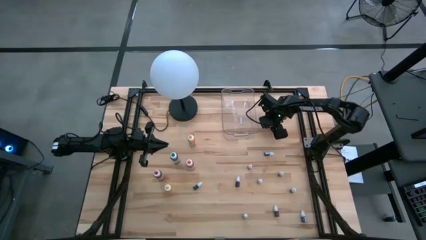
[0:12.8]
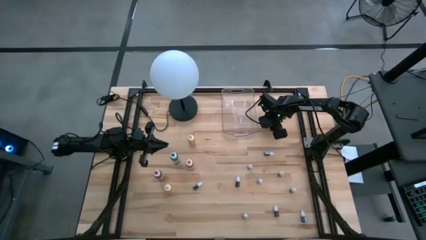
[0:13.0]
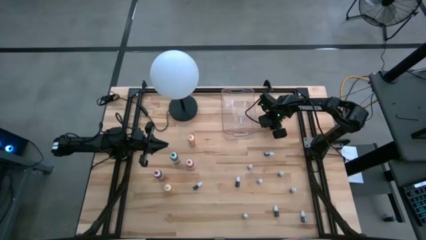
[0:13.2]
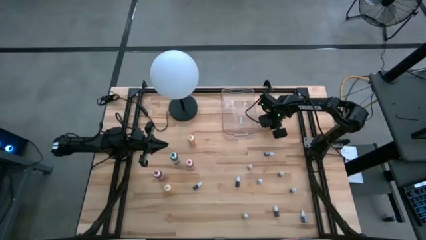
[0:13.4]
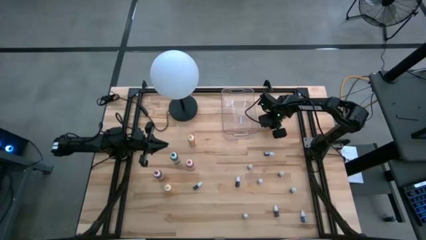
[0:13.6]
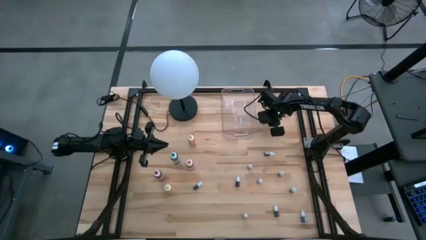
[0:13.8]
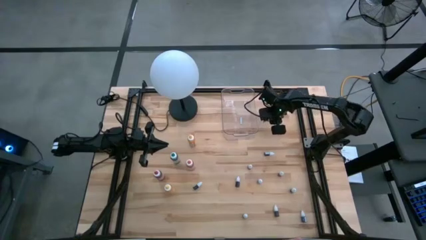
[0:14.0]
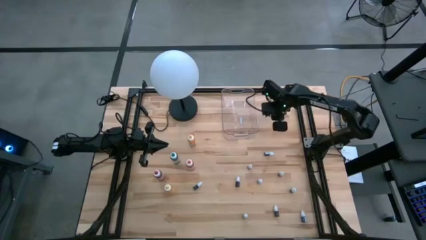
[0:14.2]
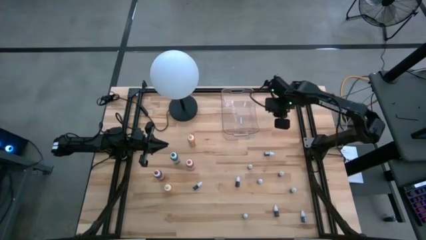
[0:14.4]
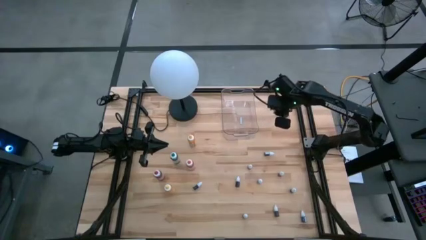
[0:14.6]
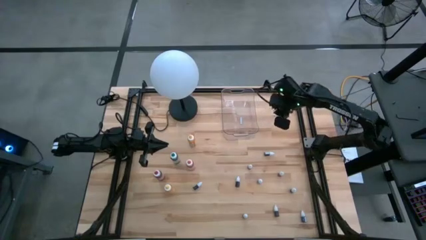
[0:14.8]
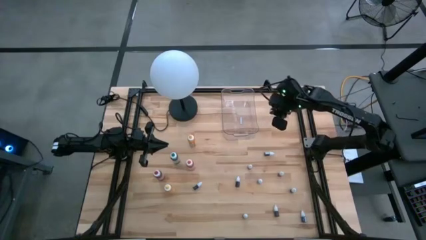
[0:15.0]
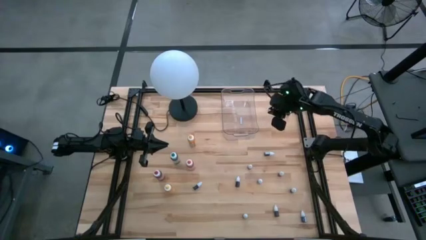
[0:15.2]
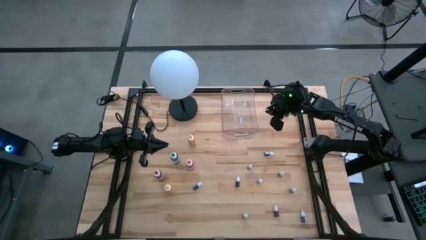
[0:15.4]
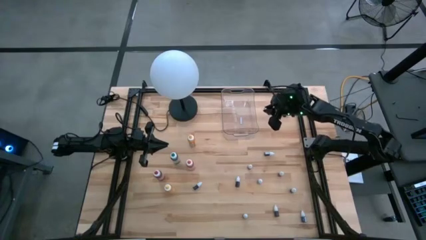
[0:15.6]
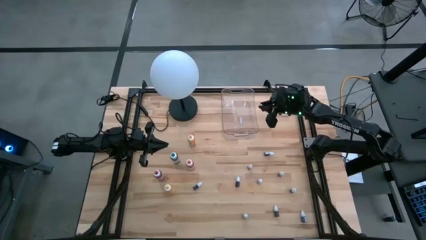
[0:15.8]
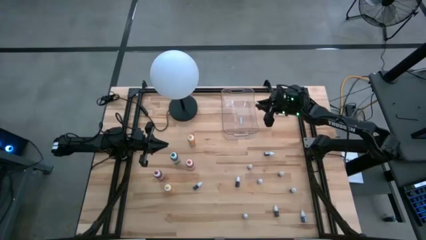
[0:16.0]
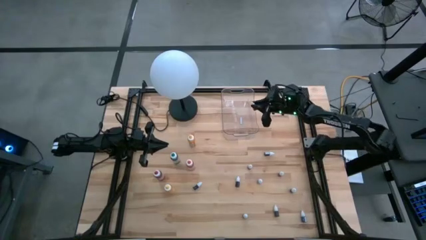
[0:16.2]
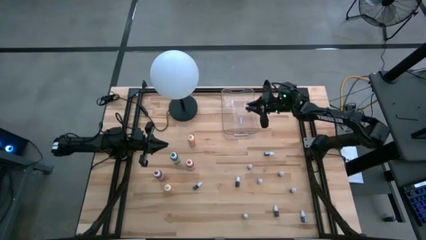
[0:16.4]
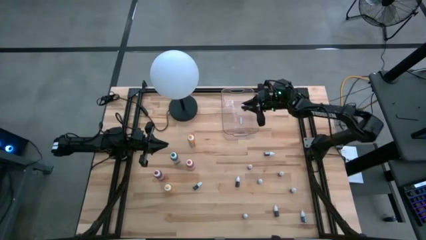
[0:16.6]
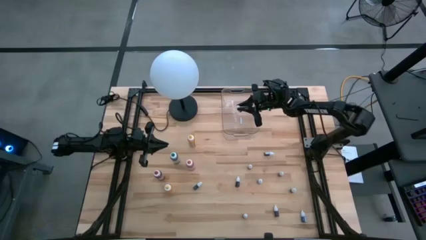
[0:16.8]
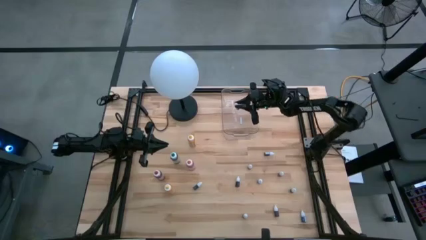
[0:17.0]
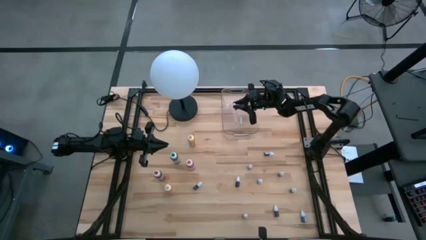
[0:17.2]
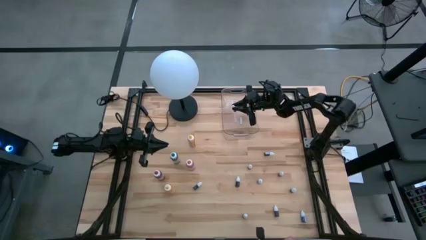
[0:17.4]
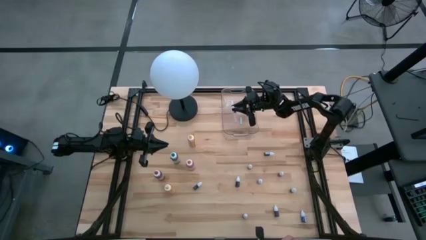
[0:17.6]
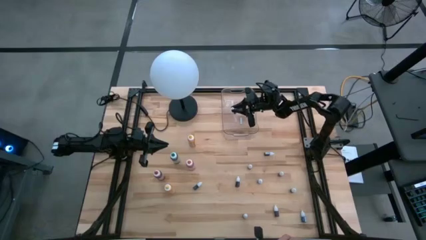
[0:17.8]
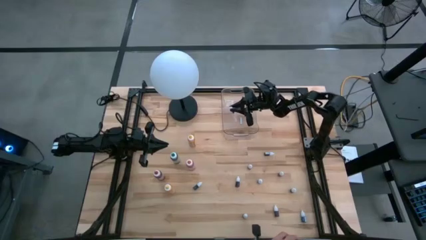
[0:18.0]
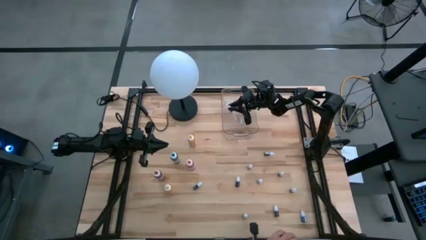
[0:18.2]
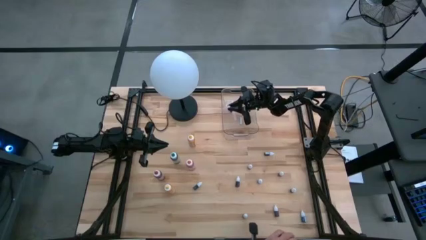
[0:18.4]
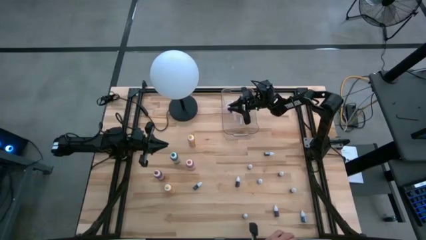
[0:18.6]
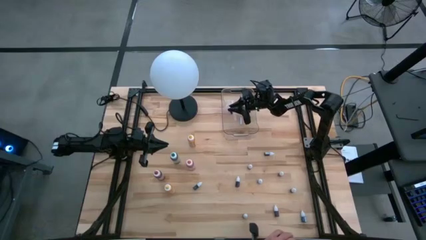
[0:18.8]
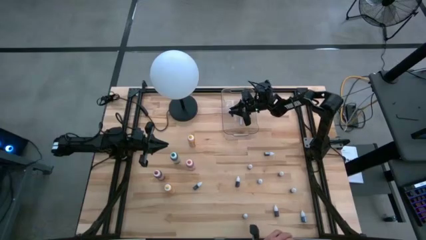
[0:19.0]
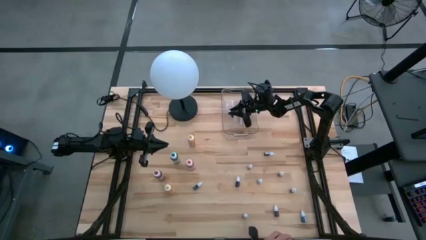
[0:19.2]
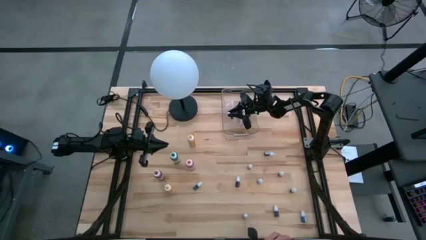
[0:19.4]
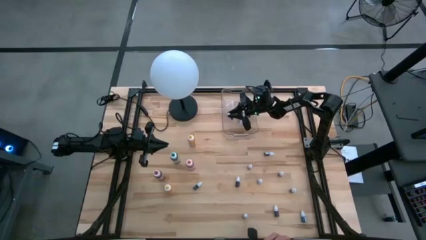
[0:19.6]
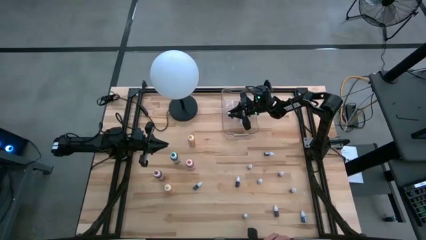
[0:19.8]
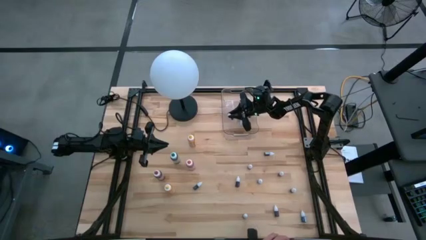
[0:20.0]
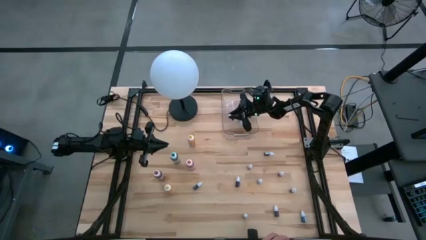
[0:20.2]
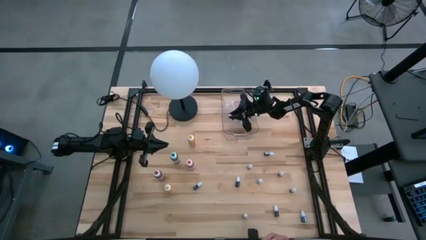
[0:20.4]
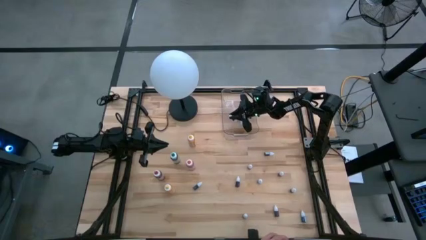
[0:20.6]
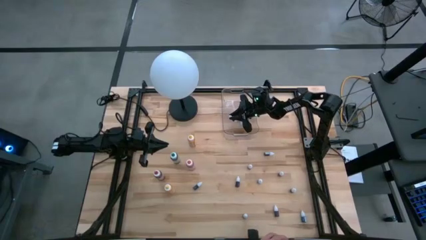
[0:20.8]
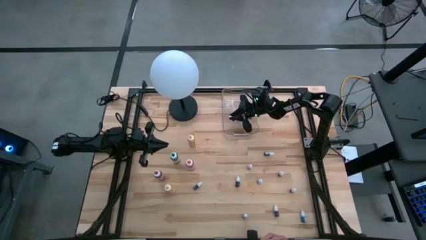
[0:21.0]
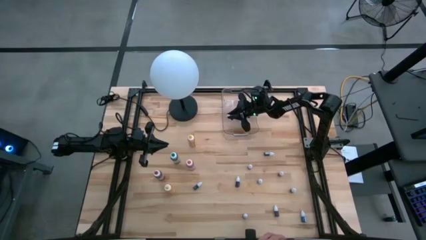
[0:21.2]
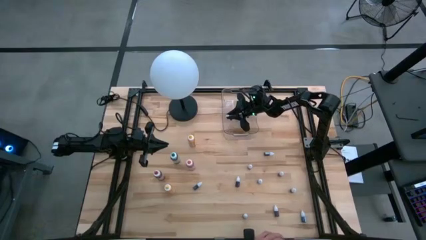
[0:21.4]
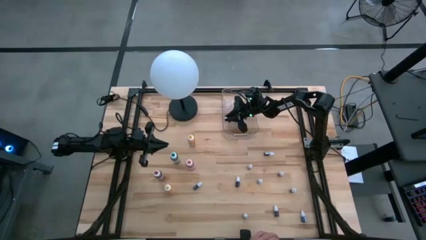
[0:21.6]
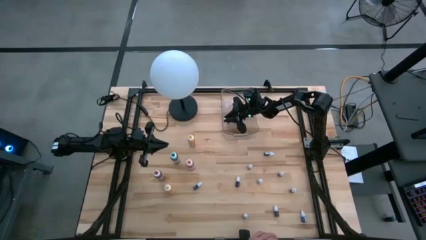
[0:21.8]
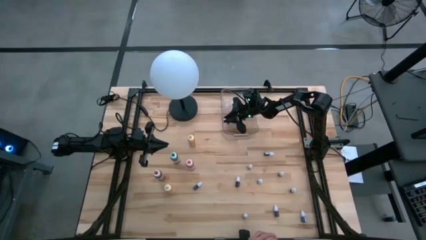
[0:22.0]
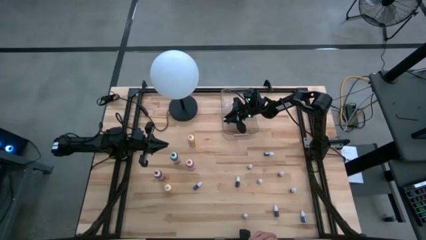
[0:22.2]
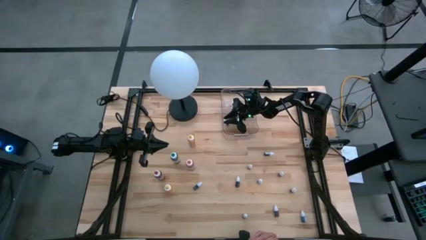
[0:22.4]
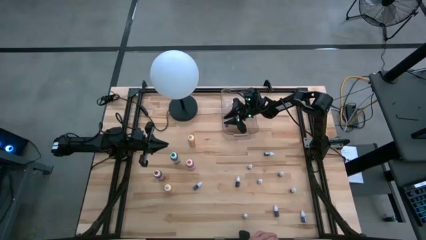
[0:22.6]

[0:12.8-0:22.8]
Task: Pick & Place food coloring
Put the small orange food coloring bottle into the transparent bin

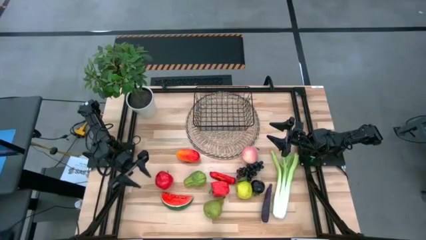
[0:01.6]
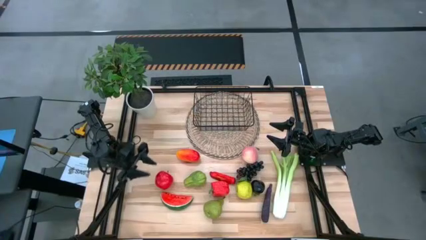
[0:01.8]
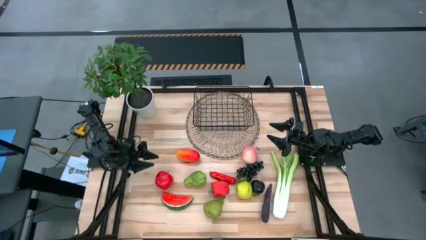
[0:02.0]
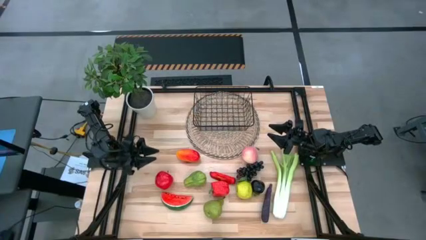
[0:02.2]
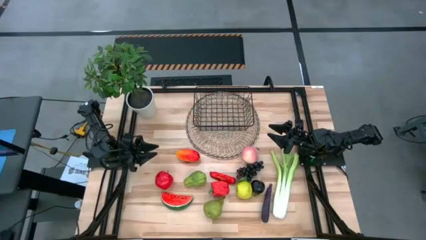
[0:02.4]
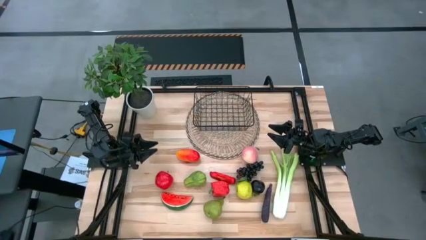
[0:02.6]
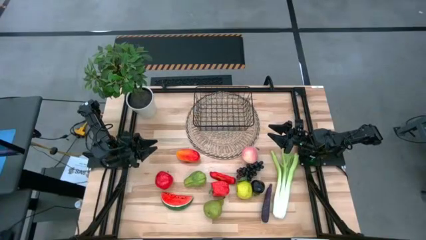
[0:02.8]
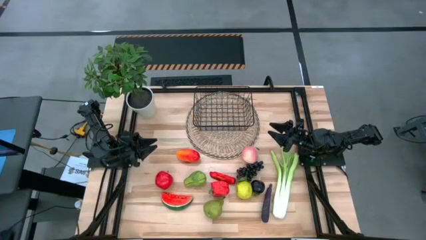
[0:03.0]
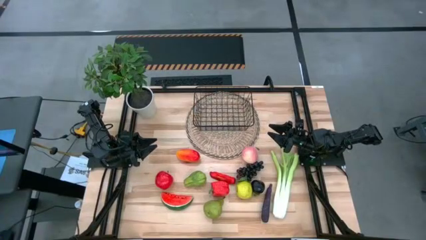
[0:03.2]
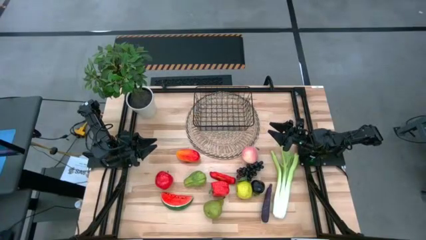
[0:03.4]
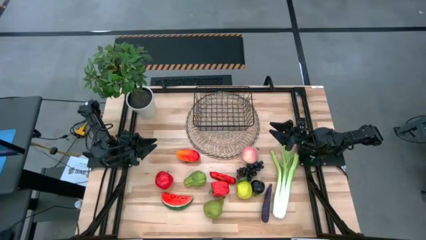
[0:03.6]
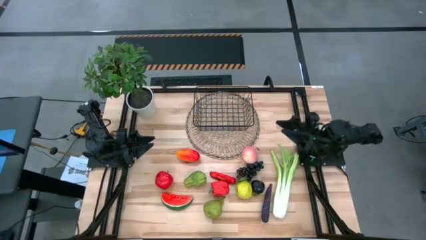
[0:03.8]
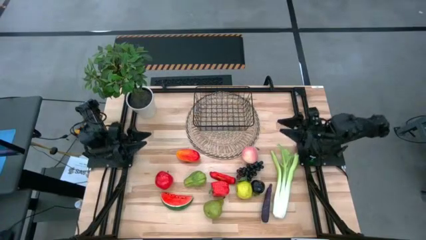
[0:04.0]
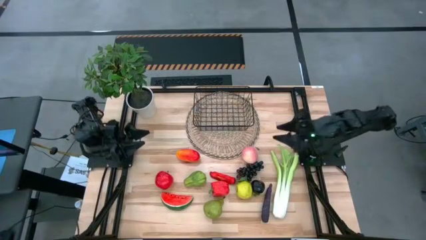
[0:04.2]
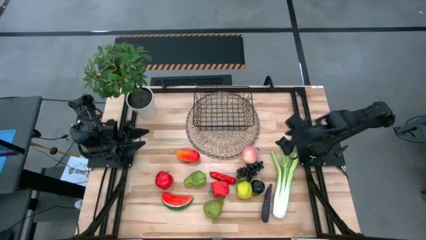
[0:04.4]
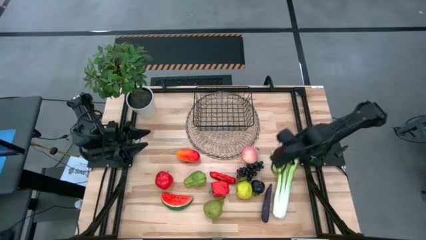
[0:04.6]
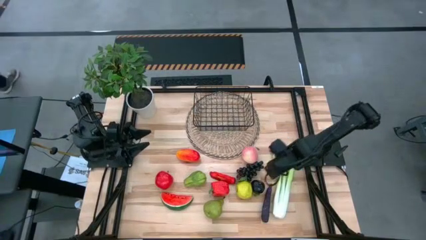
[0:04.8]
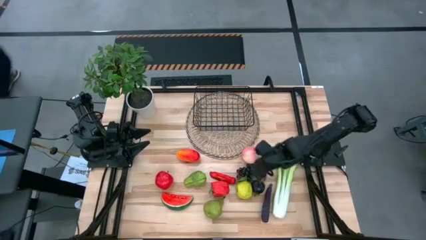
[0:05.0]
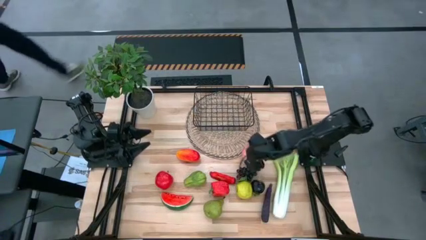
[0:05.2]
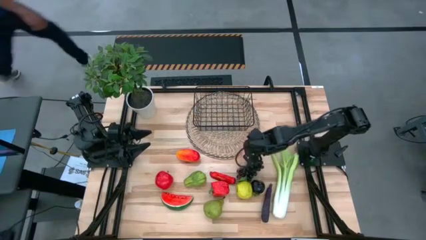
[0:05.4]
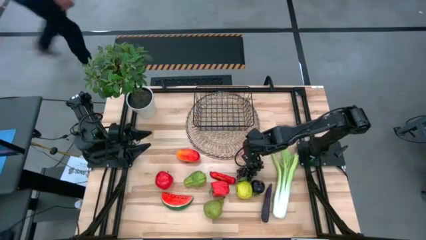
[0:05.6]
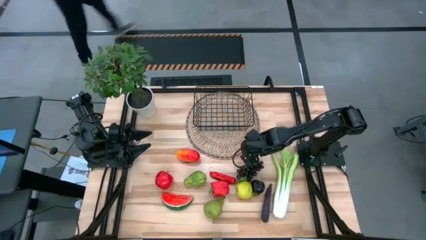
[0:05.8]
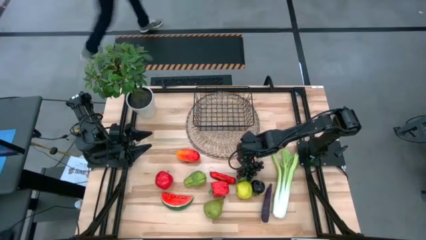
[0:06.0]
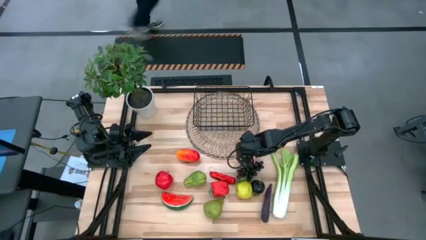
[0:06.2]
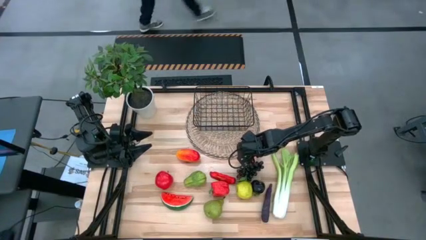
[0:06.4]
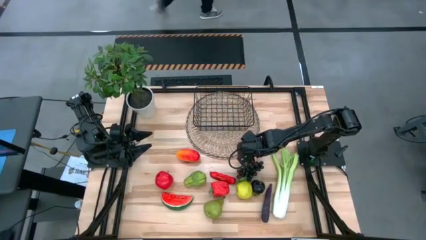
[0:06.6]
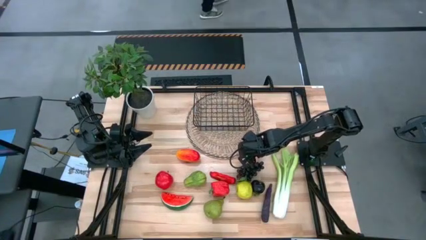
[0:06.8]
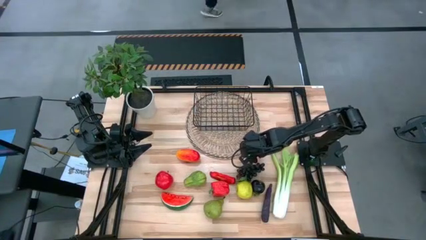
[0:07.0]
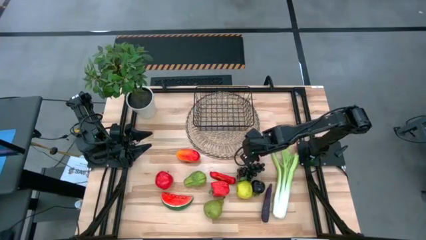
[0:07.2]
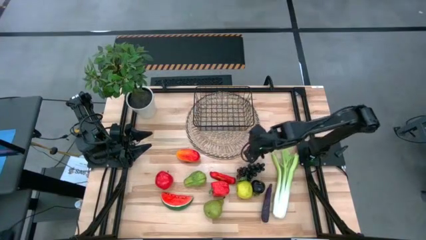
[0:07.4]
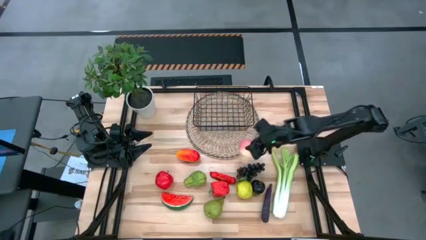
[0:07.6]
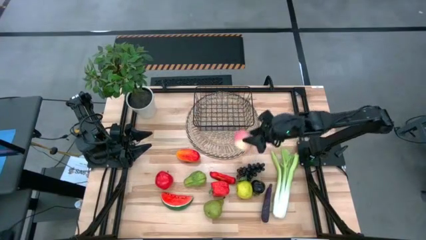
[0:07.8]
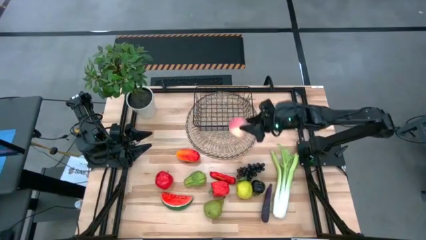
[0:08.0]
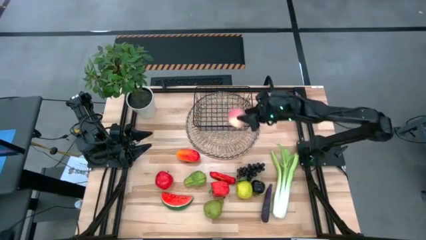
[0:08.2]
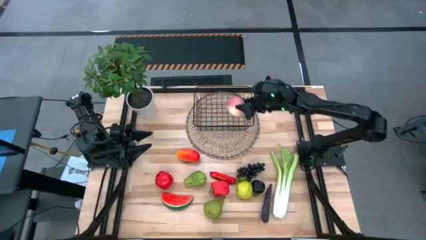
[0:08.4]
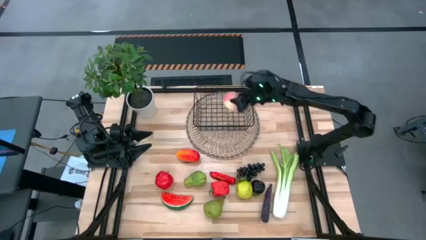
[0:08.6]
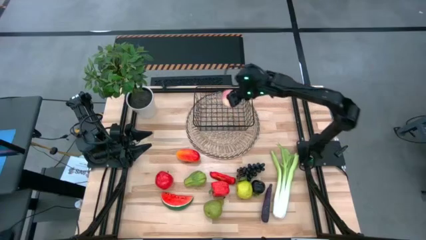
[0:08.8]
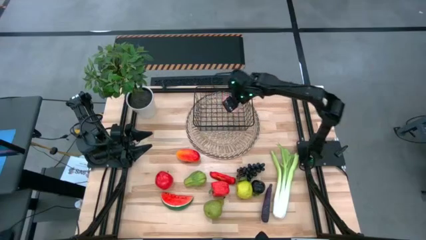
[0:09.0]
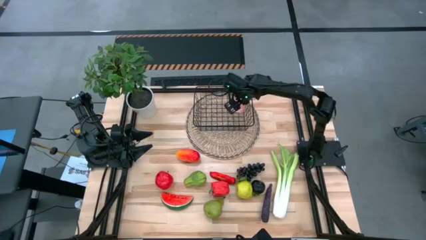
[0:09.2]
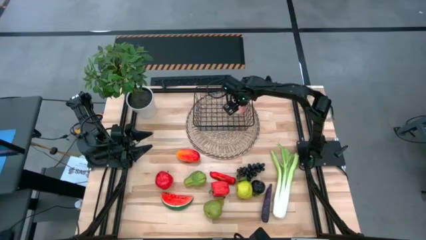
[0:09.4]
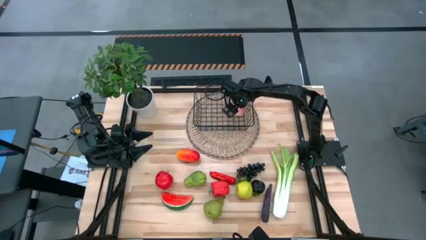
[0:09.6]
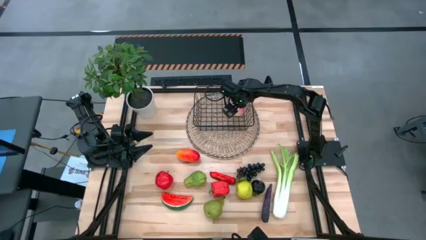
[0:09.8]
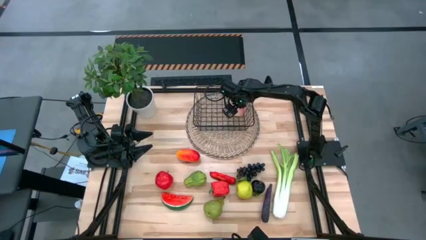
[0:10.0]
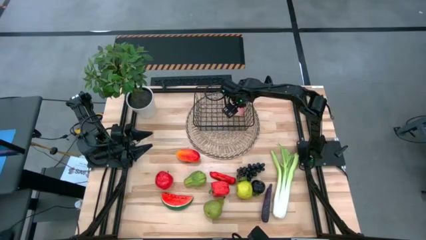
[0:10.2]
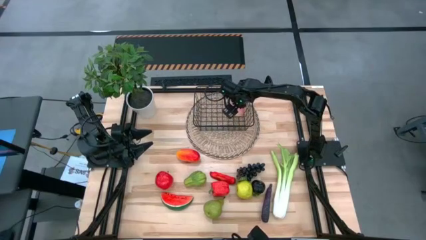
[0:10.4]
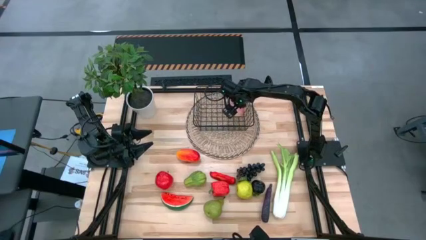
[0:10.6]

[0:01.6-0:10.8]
Task: Build produce basket
Put the pink peach into the black wire basket
